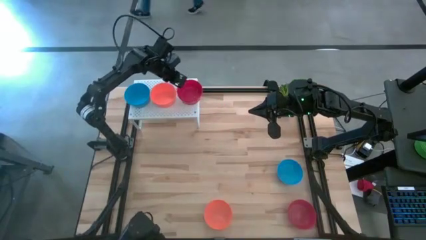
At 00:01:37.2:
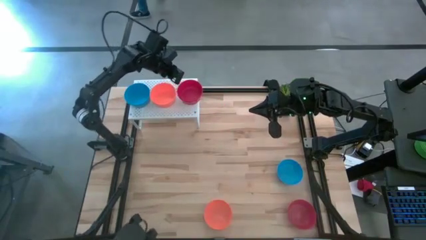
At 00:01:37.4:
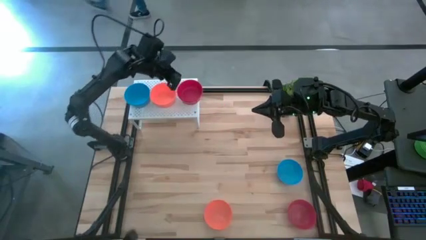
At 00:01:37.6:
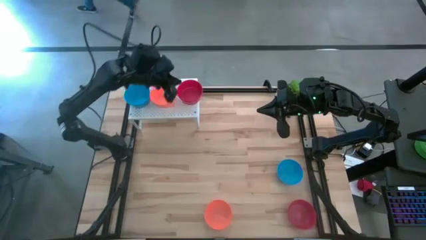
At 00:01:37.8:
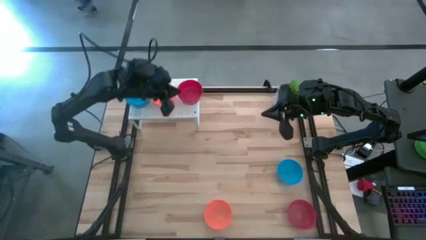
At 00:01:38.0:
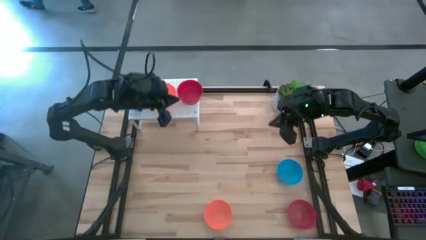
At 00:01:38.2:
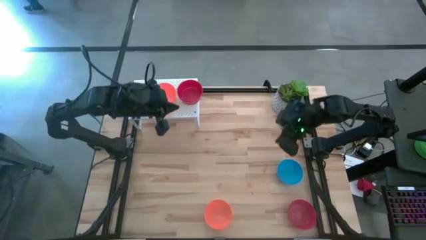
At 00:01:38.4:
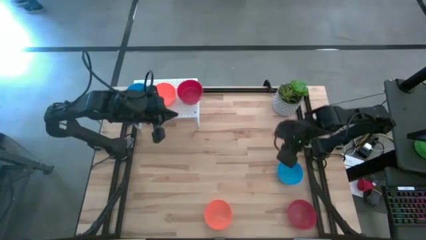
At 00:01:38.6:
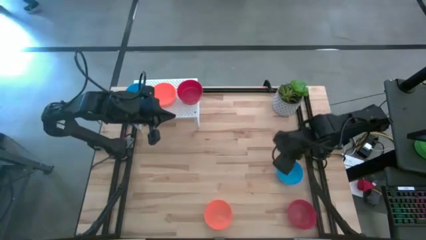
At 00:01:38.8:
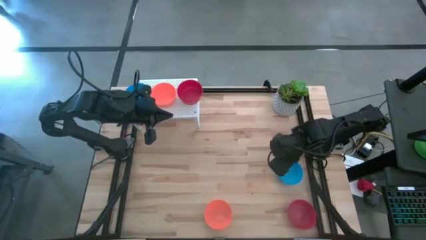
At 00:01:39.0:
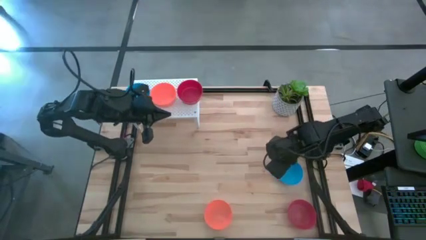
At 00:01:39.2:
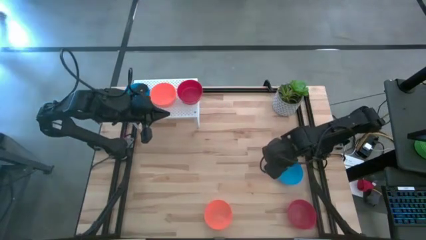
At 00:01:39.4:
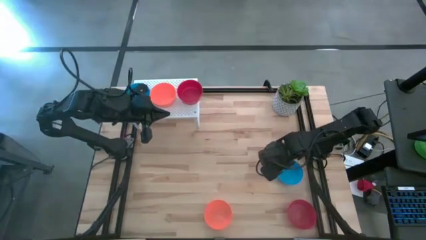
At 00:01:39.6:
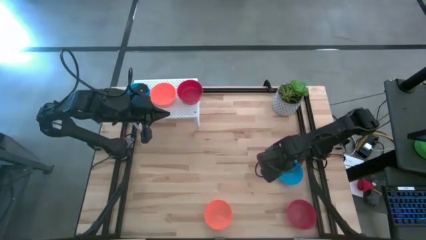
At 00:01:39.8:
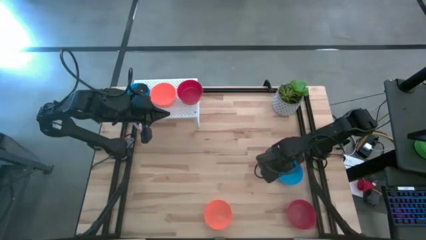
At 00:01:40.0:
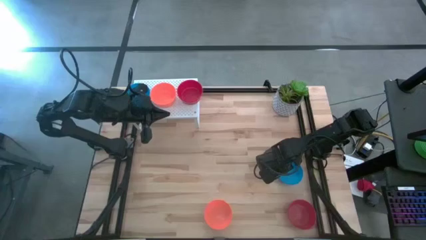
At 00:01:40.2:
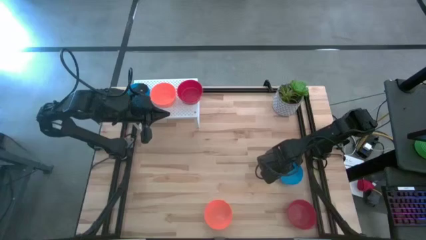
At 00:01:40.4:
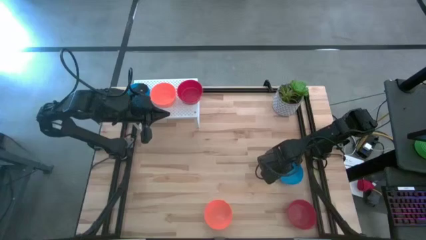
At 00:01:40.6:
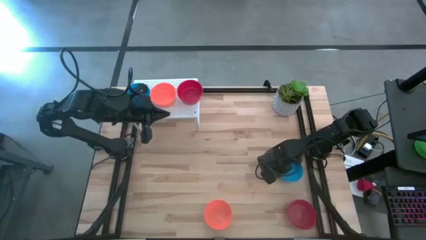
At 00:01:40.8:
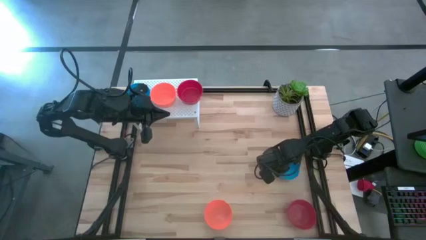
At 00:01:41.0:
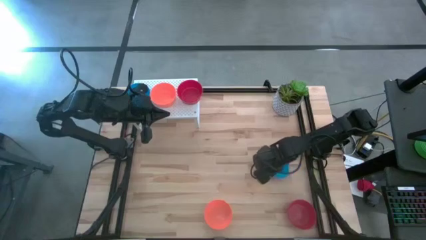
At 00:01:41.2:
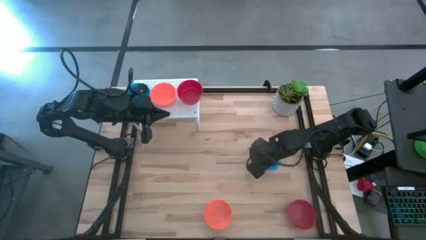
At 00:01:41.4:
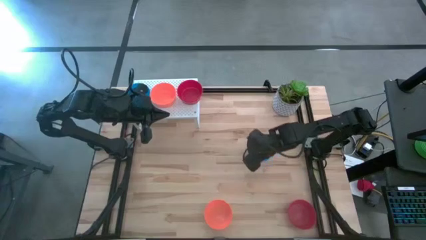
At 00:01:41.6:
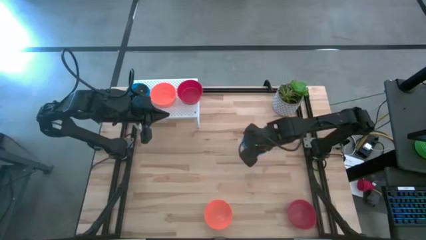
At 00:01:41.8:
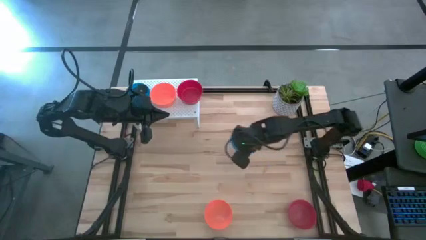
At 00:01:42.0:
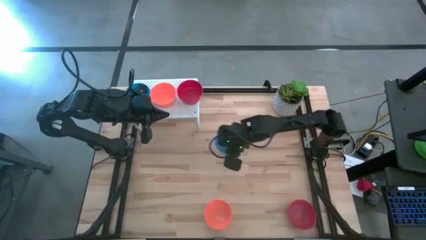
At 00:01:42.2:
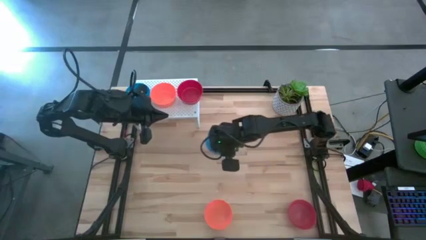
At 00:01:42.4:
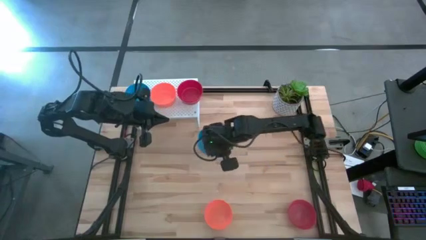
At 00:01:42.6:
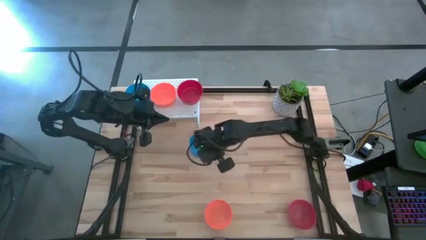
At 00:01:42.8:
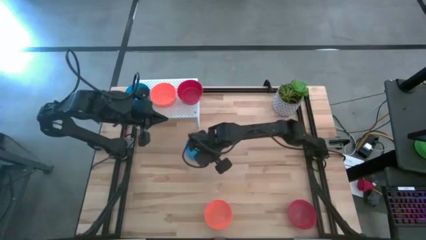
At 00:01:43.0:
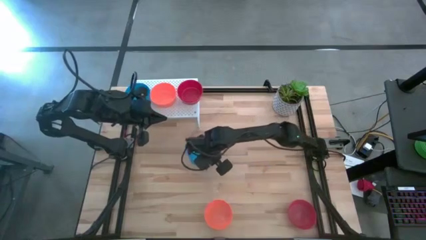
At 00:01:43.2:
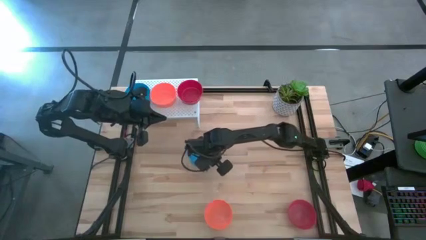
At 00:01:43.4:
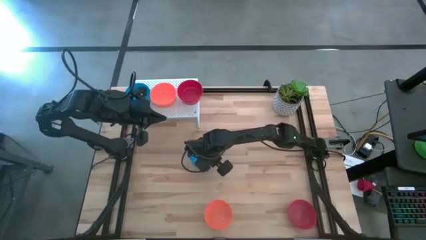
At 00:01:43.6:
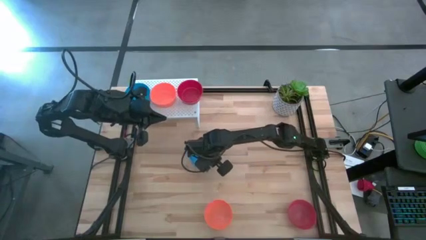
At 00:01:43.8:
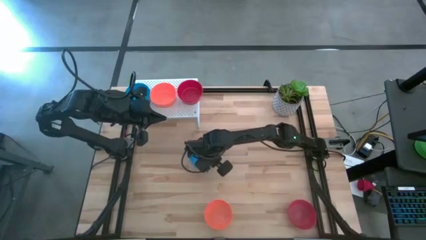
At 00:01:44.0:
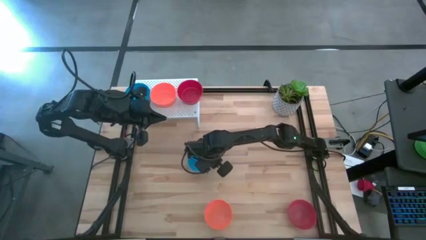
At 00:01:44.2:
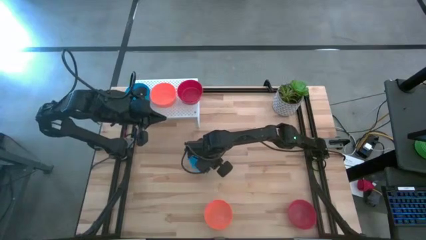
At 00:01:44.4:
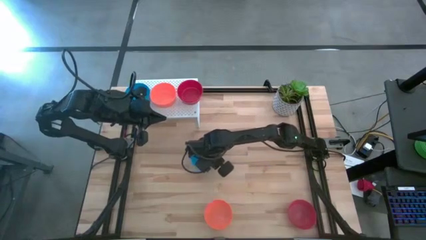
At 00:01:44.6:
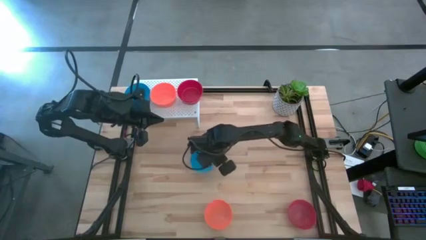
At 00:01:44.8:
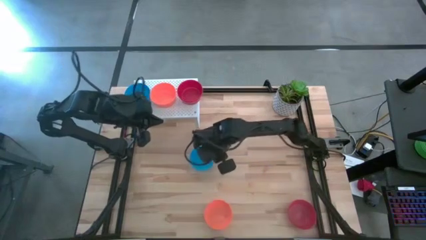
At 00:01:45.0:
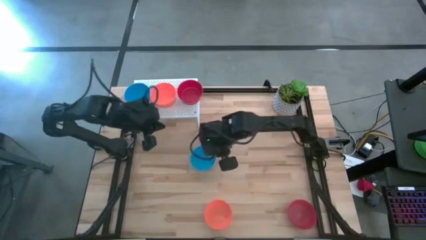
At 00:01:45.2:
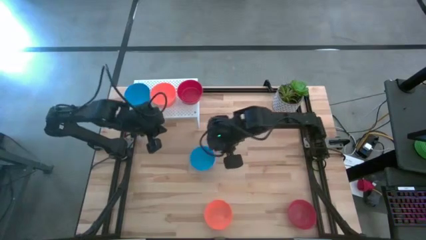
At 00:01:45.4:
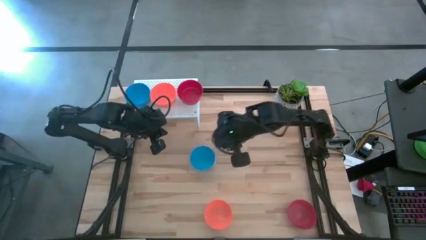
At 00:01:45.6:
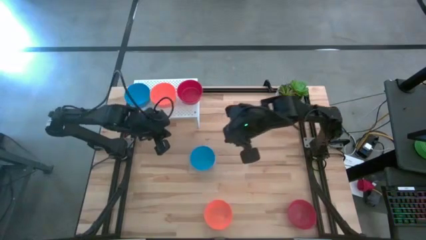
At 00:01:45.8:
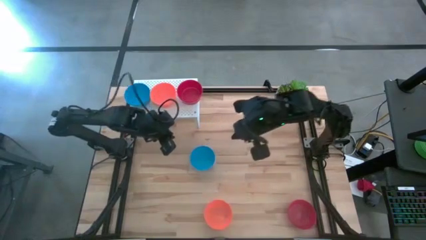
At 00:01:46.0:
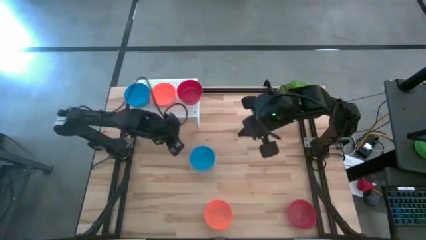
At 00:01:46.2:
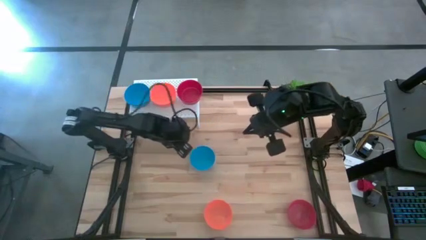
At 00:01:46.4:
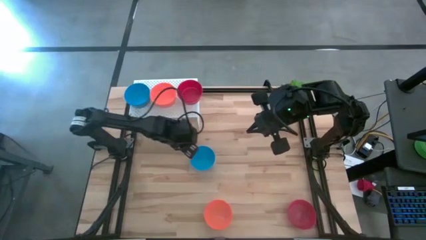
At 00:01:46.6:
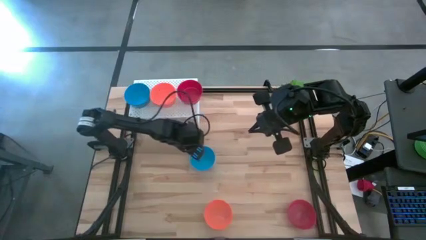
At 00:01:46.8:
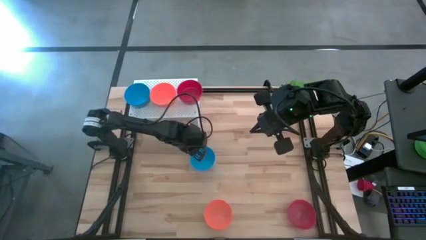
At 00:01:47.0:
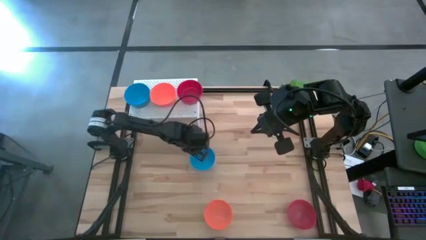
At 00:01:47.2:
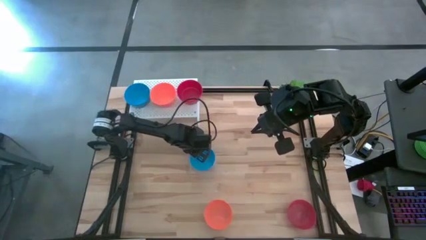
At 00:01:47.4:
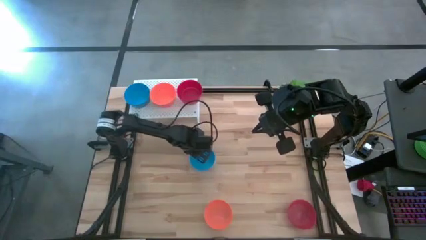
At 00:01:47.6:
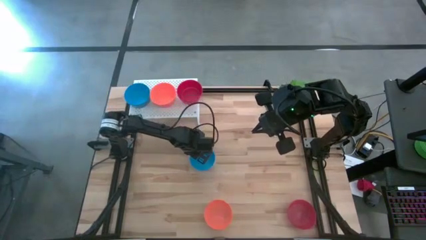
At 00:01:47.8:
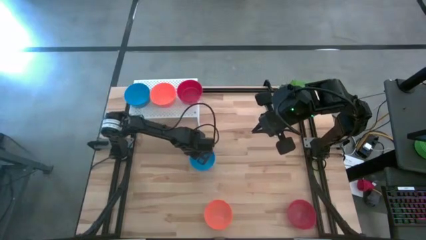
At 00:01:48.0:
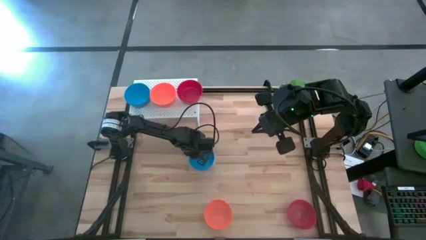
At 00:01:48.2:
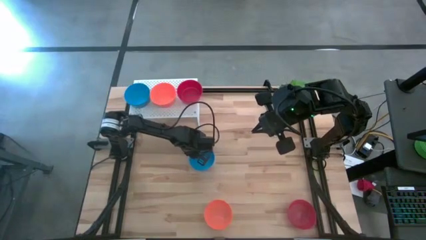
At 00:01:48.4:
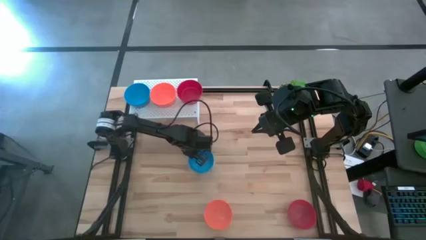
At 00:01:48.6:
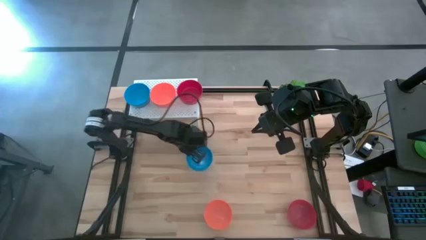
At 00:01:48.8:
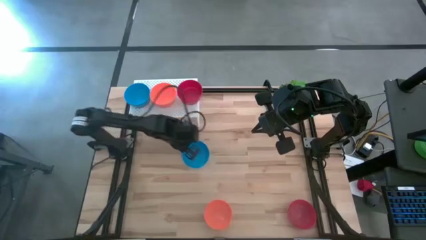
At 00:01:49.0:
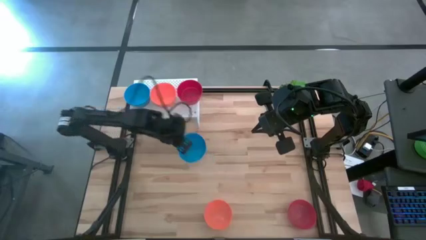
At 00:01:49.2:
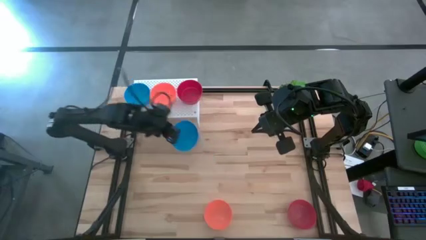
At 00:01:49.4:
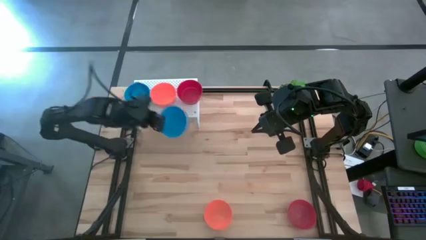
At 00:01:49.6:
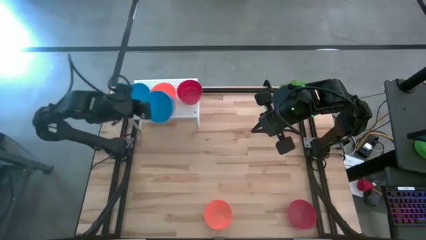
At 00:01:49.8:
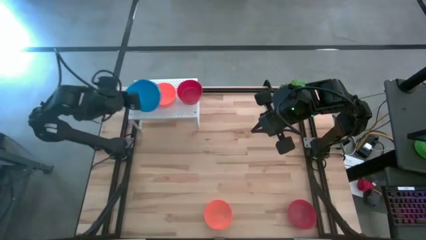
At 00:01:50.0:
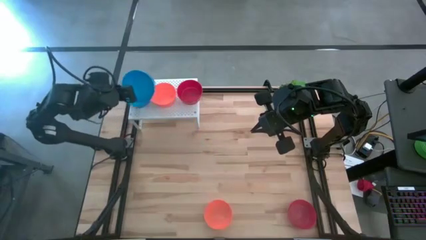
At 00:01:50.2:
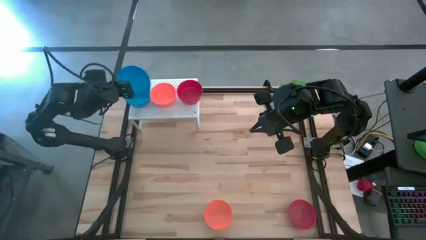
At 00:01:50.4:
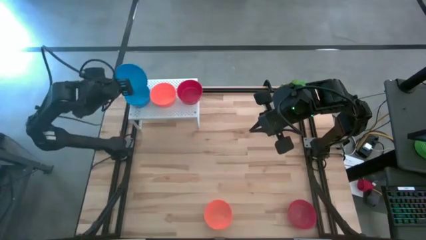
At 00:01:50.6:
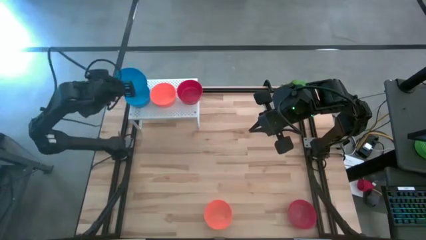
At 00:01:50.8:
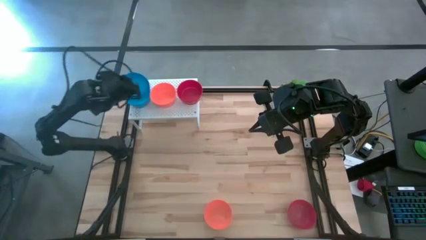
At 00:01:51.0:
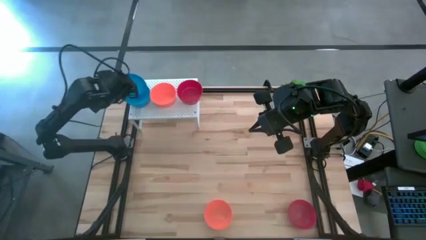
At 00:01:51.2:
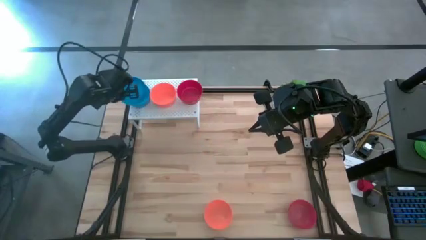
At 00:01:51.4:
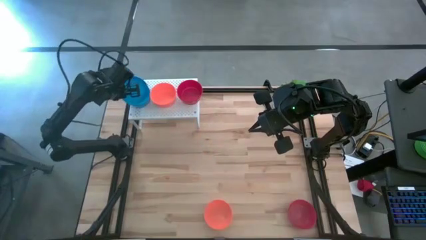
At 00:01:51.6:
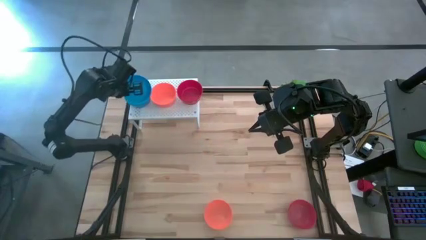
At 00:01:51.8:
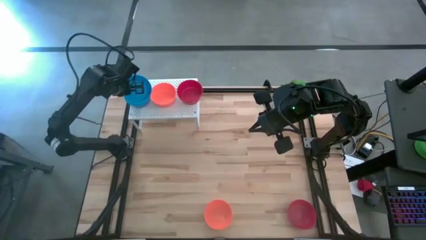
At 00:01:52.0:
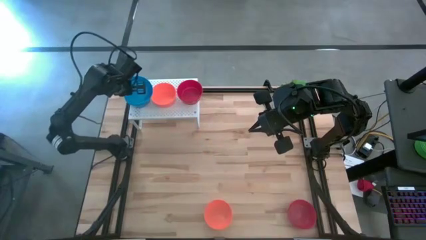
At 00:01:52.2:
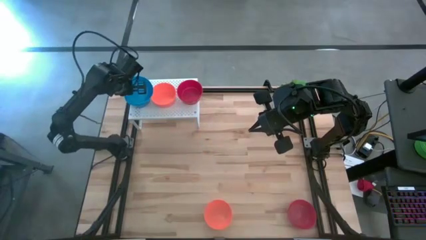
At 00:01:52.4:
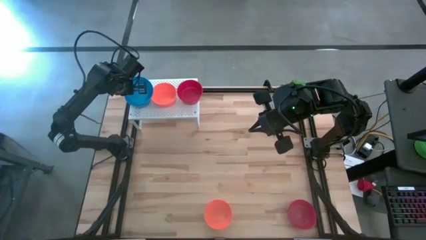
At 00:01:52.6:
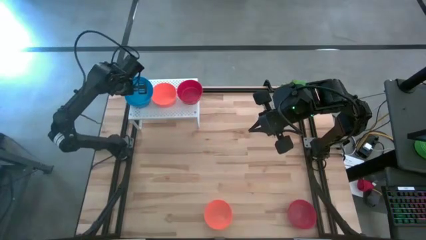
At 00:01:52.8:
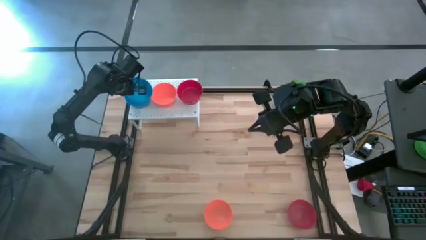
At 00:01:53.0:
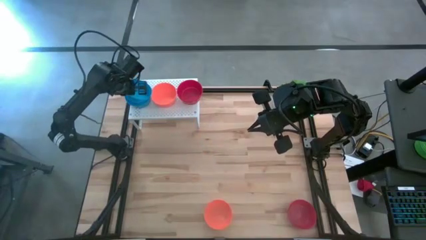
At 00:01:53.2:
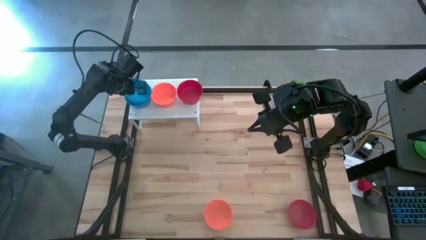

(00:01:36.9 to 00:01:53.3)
Task: Pick & Place Mini bowls
Stack the blue bowl on top of the blue bowl on the shelf
